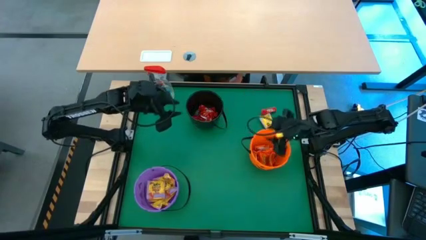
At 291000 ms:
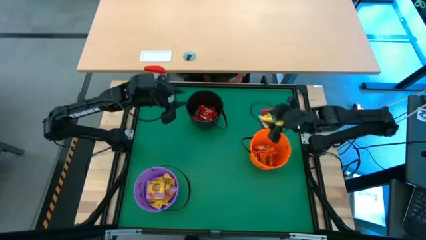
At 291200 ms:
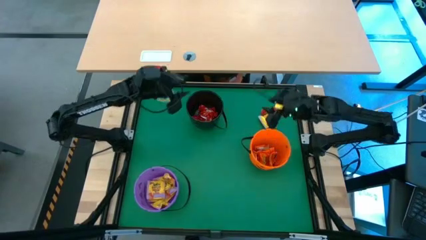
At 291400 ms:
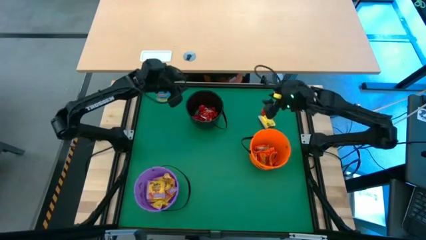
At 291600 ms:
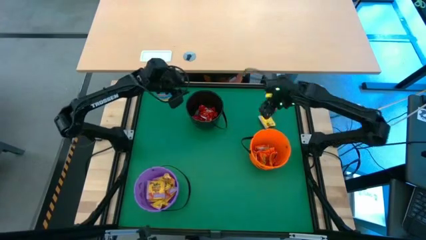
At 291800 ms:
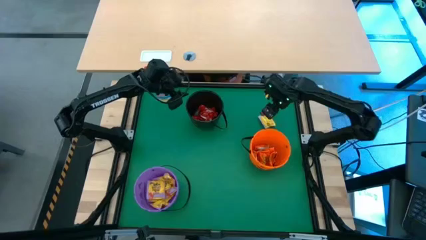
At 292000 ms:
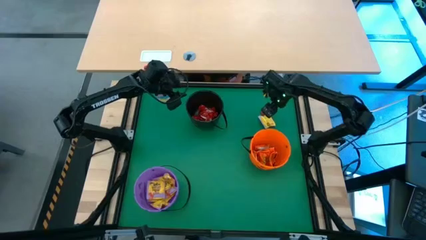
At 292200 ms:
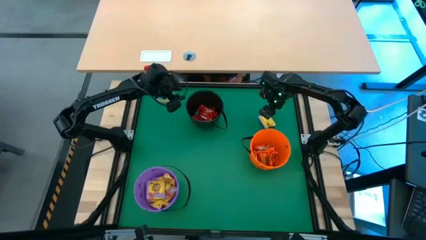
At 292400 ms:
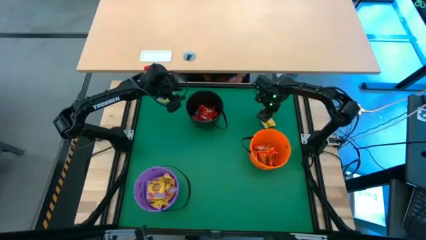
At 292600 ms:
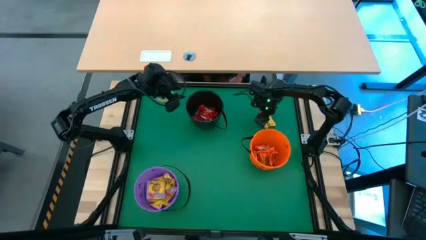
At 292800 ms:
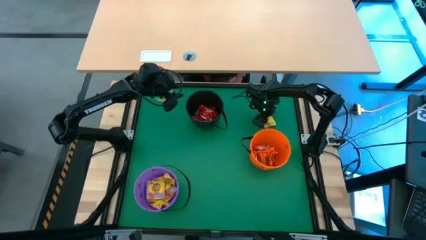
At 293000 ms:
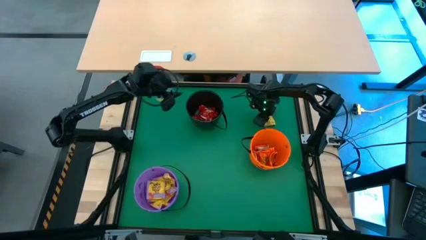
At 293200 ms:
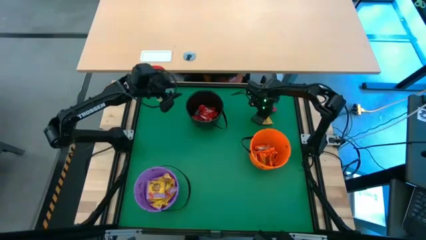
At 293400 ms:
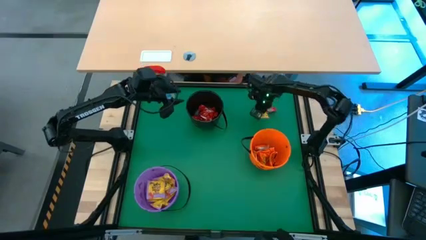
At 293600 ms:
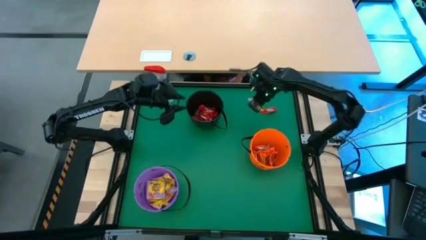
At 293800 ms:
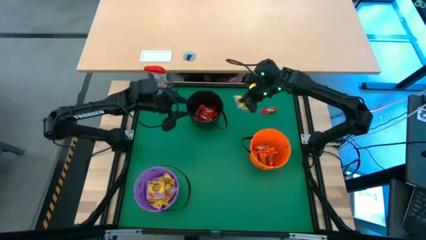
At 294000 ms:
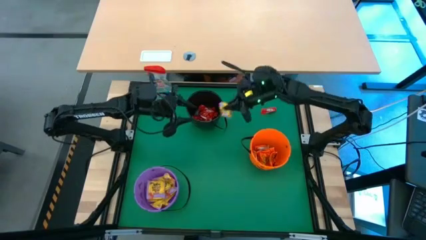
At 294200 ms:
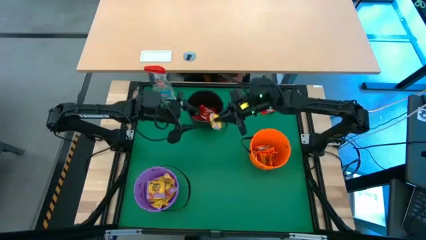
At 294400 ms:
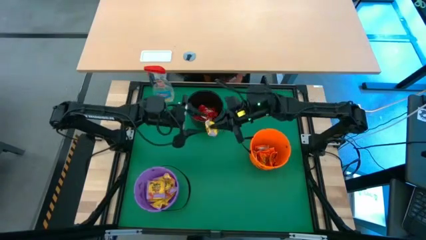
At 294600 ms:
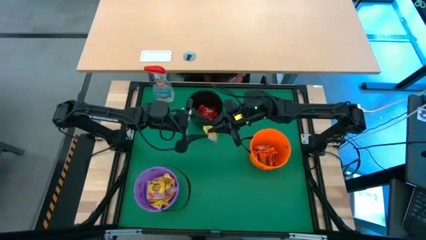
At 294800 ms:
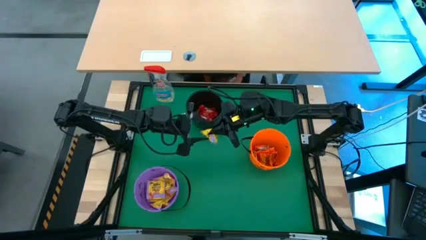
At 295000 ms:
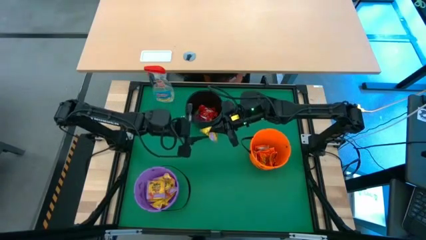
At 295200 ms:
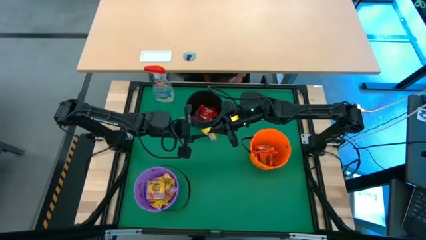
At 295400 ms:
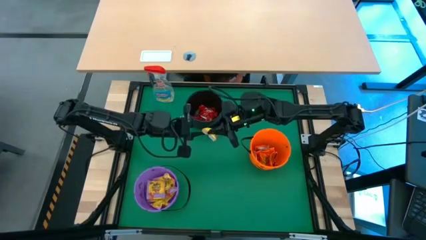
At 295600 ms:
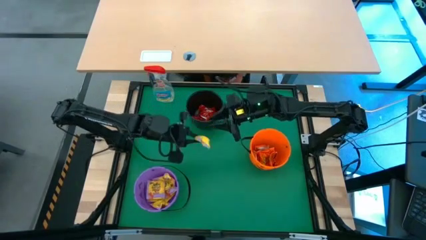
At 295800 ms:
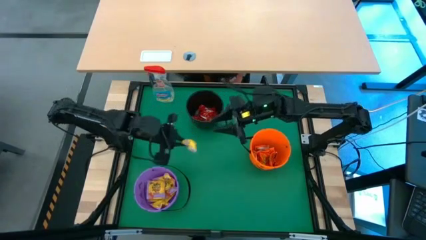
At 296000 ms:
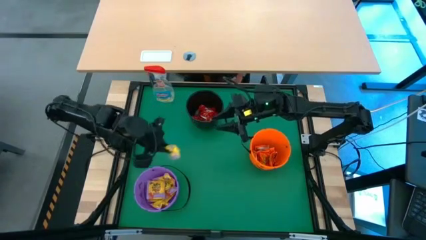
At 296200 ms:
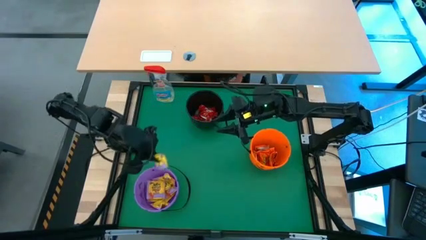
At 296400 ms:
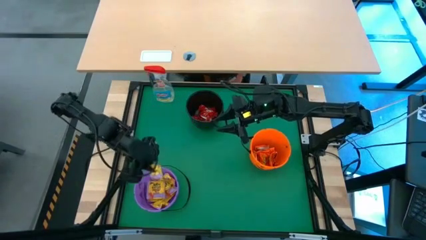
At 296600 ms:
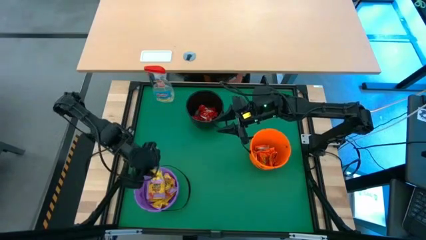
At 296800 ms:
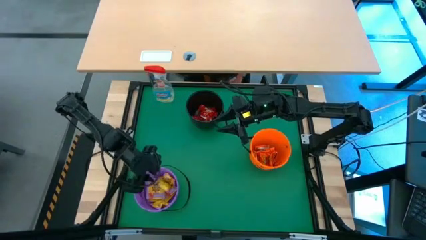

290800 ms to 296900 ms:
Task: Sort candy
Put the yellow candy into the violet bucket

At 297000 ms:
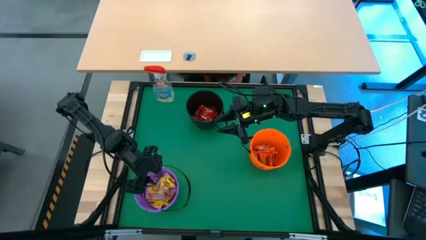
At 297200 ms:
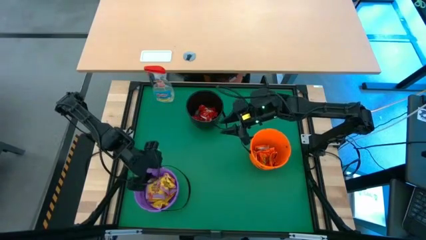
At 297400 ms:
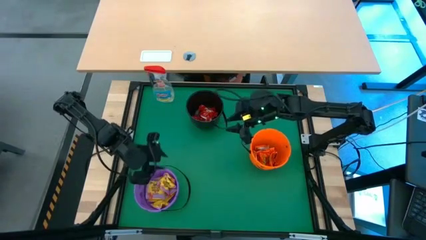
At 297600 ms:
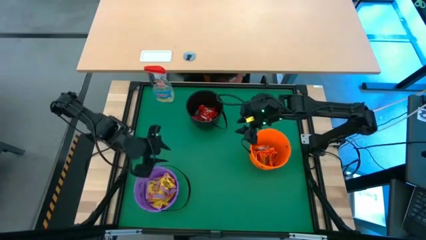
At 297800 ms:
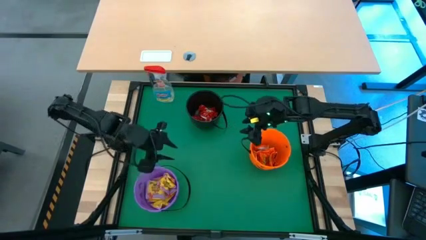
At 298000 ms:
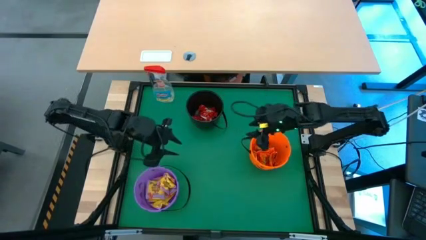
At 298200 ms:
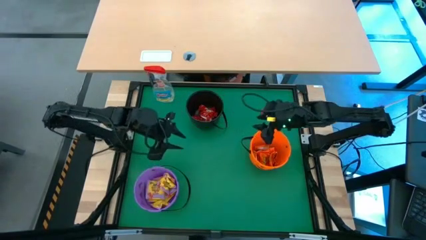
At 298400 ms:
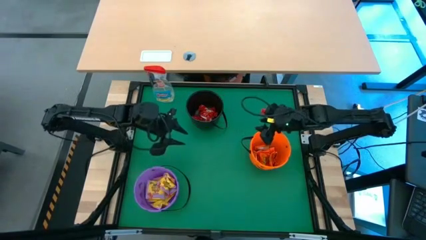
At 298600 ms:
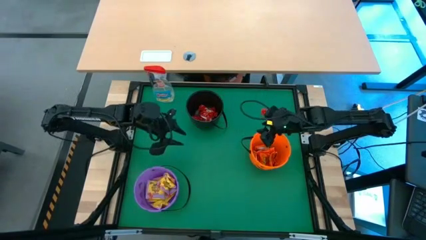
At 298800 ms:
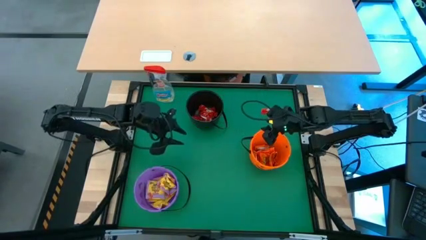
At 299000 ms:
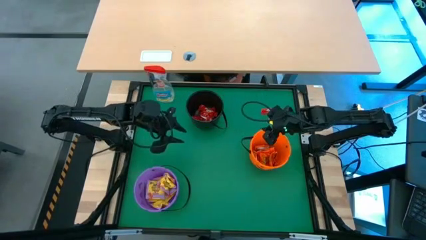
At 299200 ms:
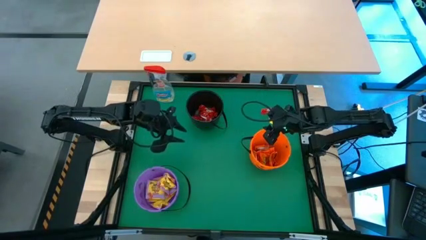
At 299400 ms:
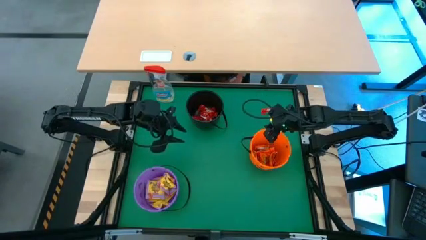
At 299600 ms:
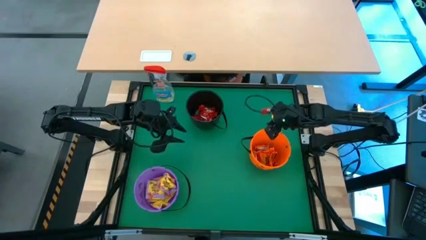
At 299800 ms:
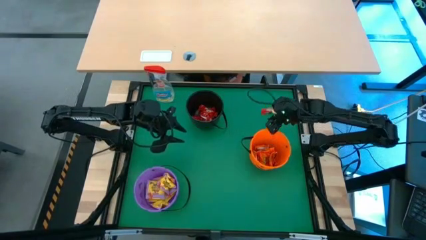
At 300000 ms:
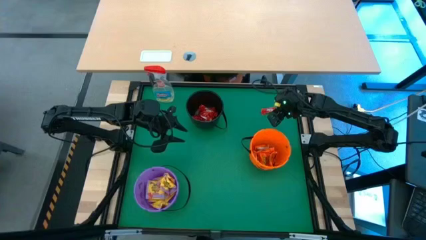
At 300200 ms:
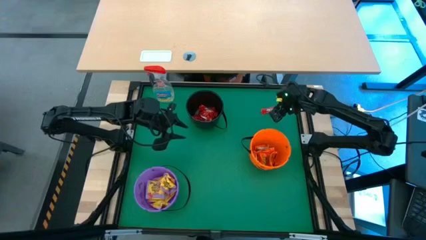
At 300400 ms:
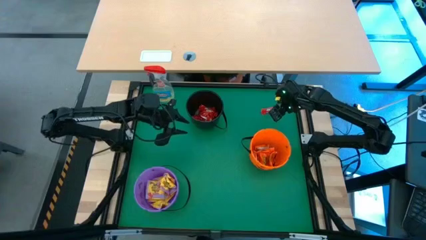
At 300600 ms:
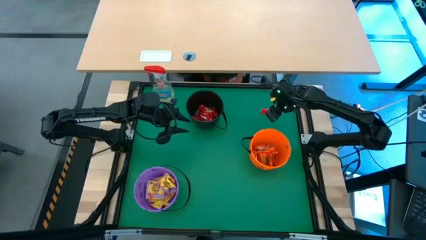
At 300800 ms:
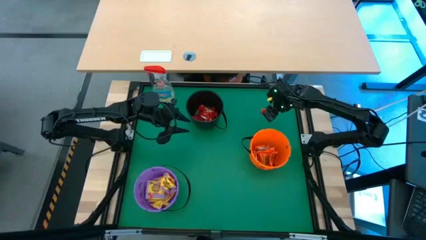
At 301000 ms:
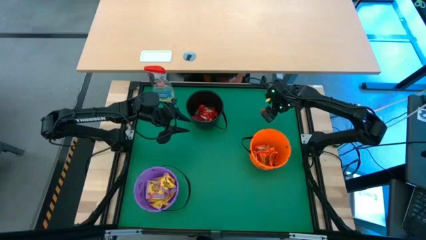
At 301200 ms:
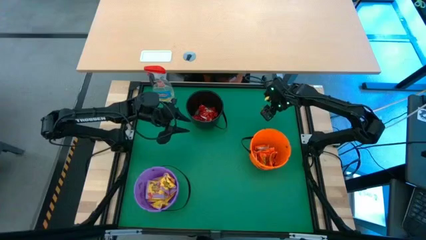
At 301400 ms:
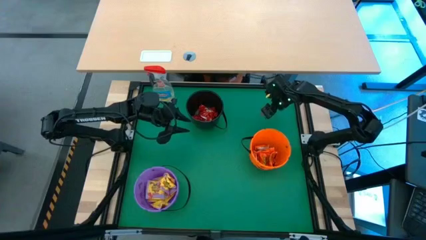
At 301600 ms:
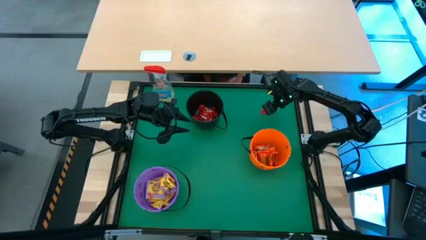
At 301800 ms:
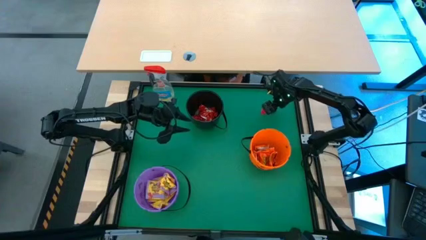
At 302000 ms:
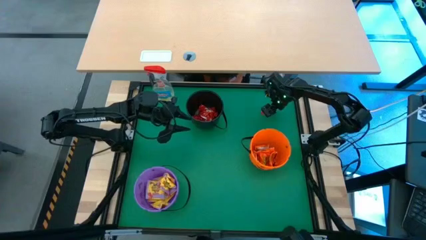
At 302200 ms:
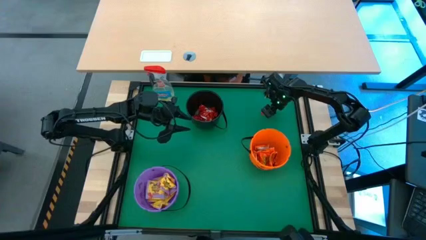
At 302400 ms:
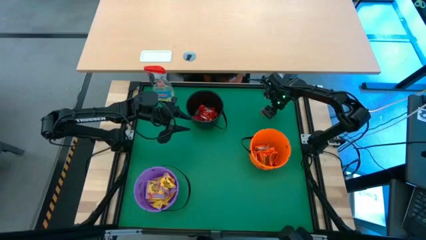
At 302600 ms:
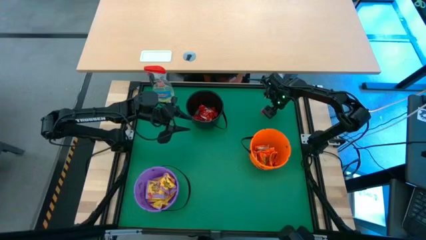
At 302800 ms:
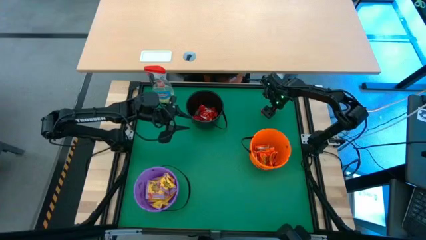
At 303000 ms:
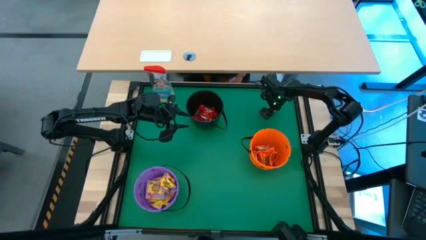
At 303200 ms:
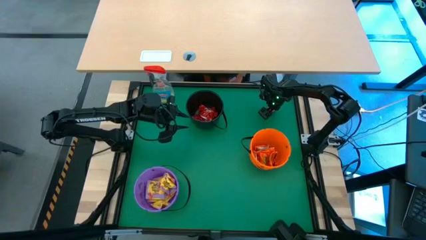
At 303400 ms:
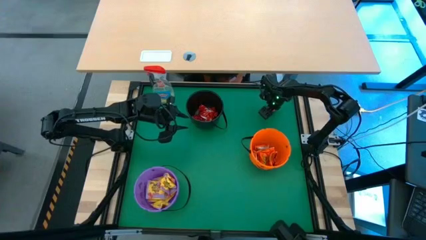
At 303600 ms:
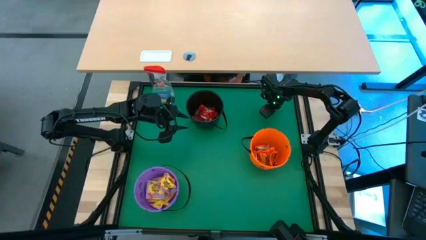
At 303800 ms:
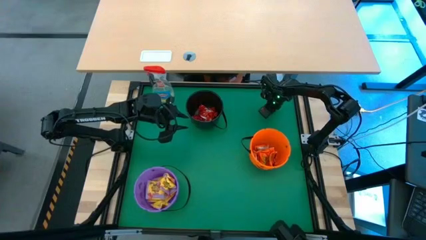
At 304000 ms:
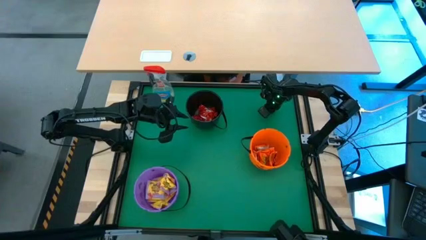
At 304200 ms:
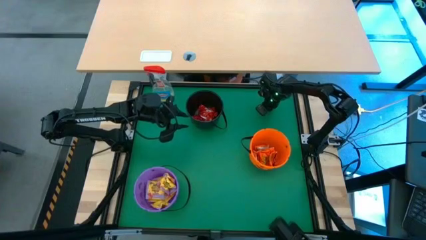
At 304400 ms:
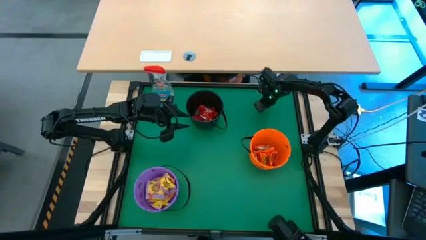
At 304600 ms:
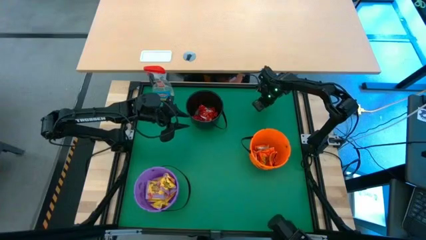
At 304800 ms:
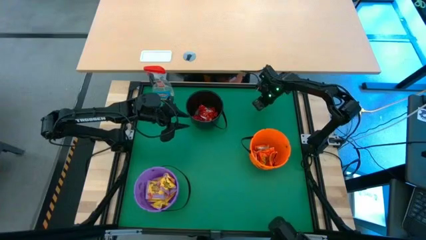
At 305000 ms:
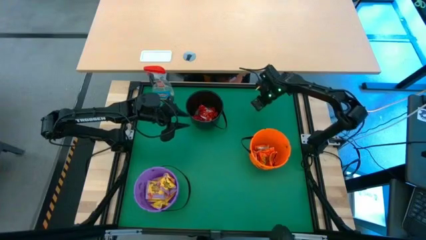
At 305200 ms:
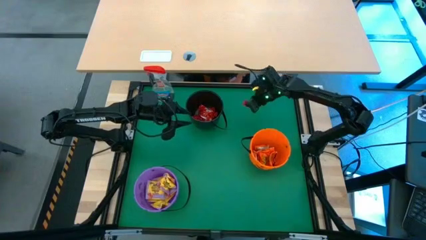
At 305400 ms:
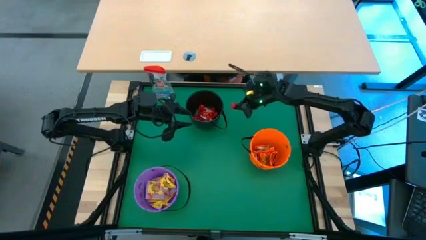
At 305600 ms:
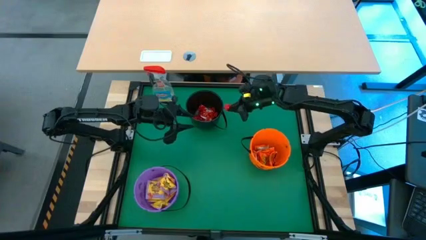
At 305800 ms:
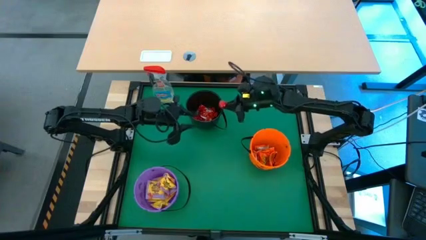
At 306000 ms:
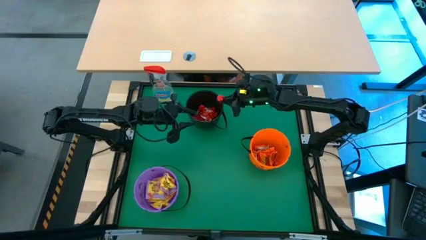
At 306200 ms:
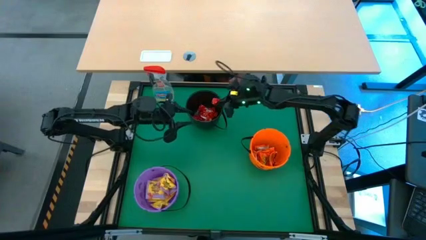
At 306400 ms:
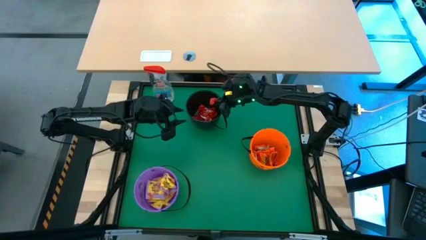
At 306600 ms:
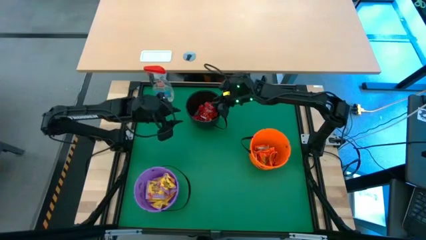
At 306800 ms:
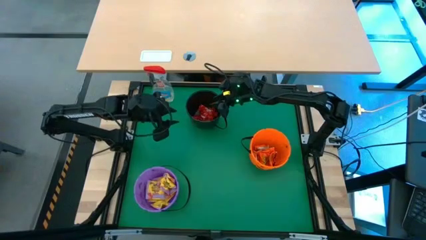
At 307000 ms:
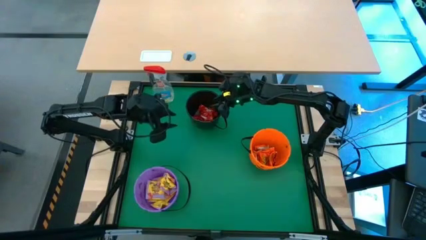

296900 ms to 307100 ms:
Put the red candy into the black bucket
